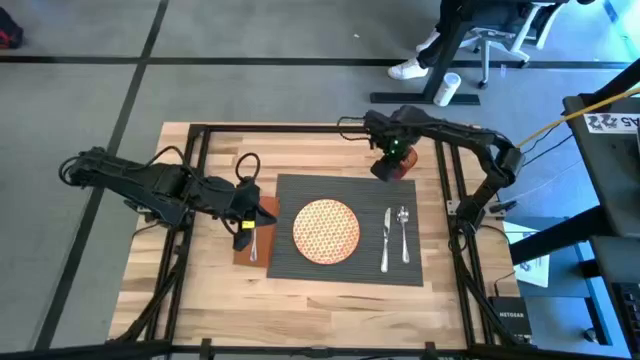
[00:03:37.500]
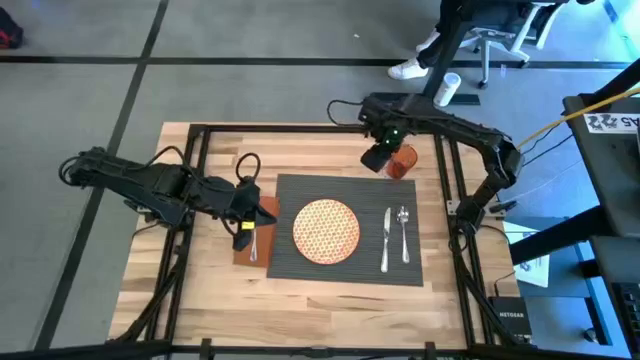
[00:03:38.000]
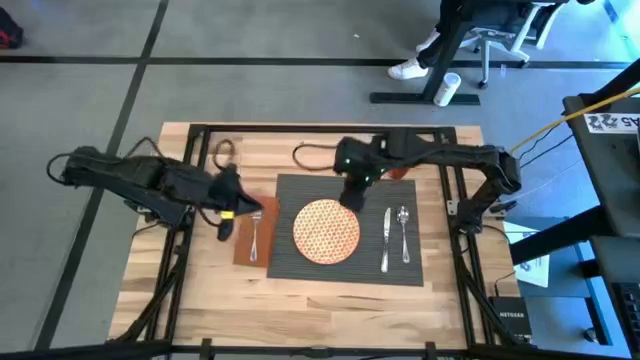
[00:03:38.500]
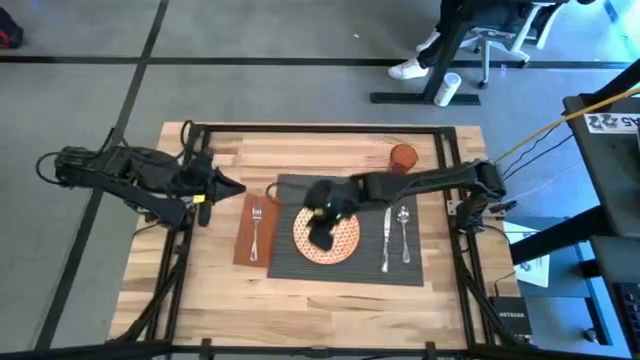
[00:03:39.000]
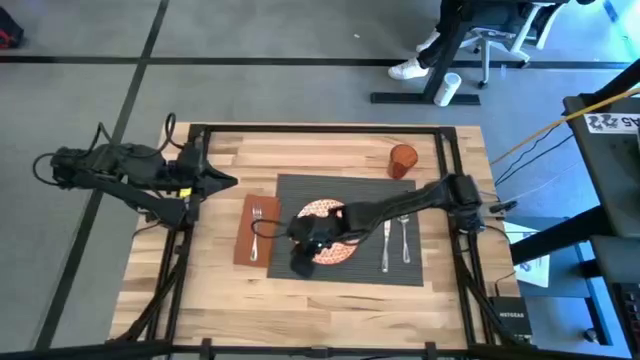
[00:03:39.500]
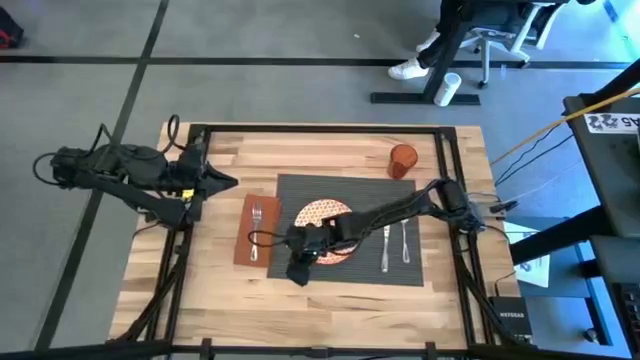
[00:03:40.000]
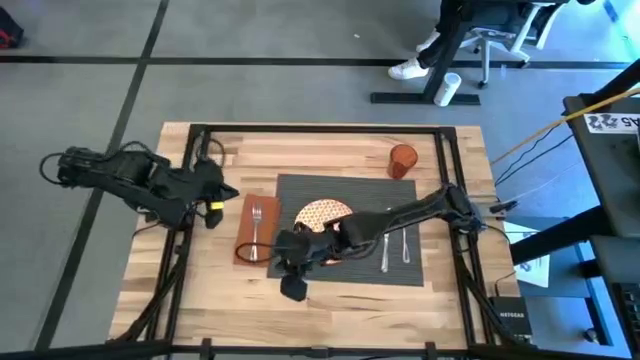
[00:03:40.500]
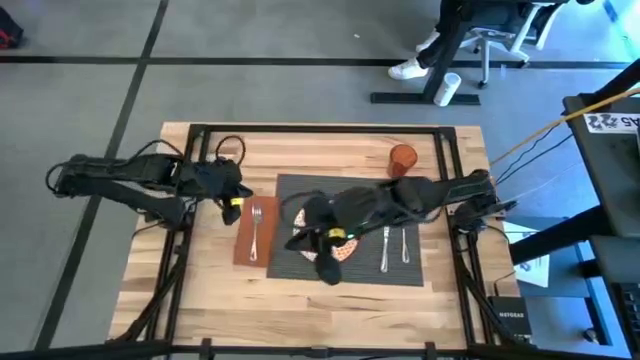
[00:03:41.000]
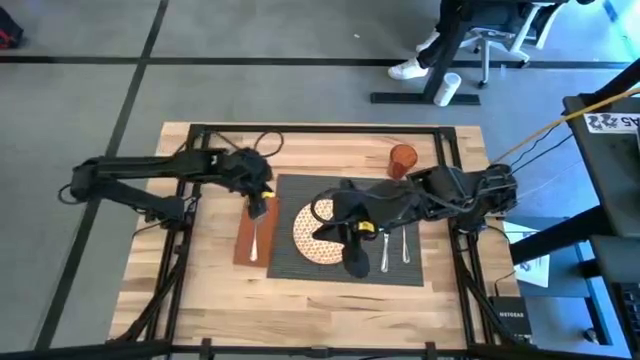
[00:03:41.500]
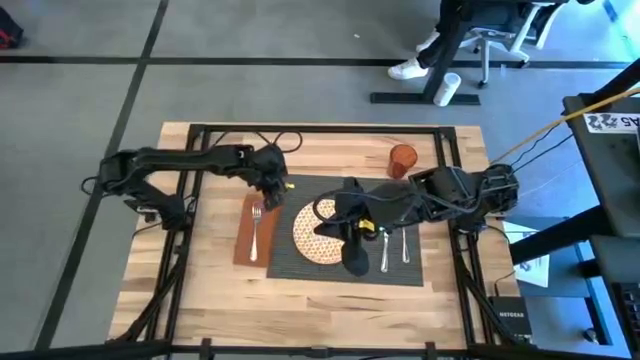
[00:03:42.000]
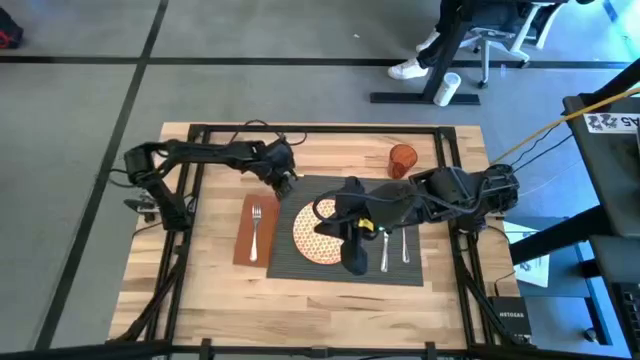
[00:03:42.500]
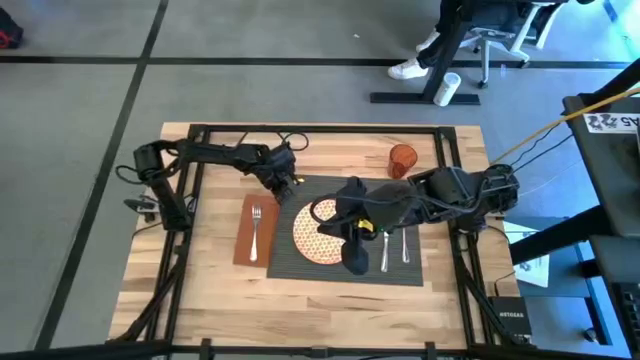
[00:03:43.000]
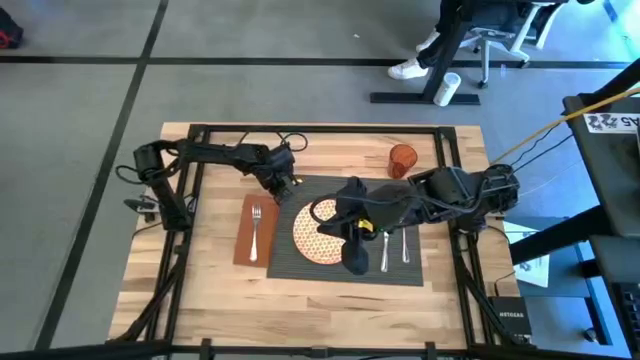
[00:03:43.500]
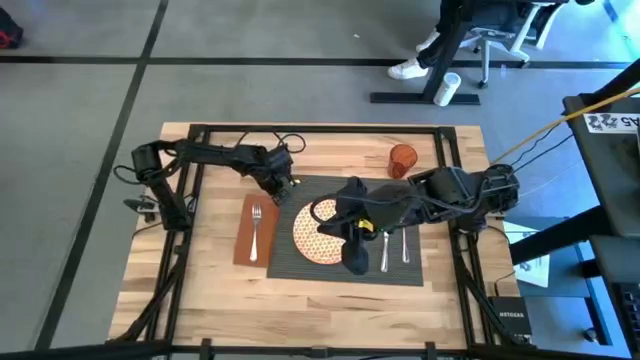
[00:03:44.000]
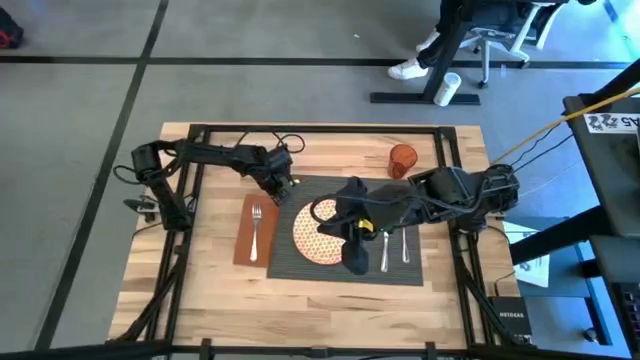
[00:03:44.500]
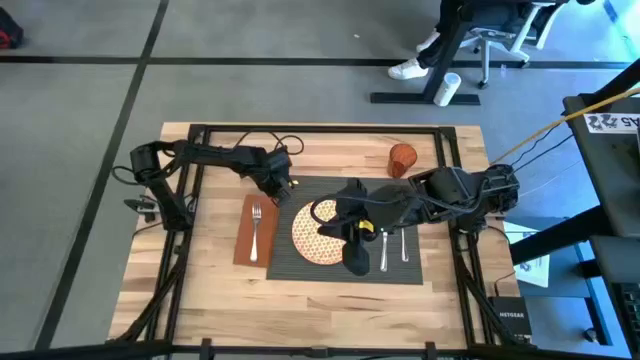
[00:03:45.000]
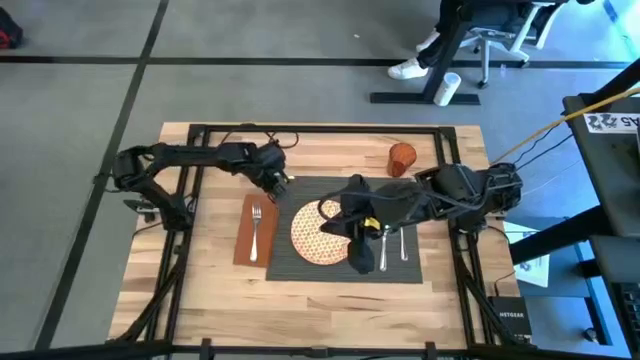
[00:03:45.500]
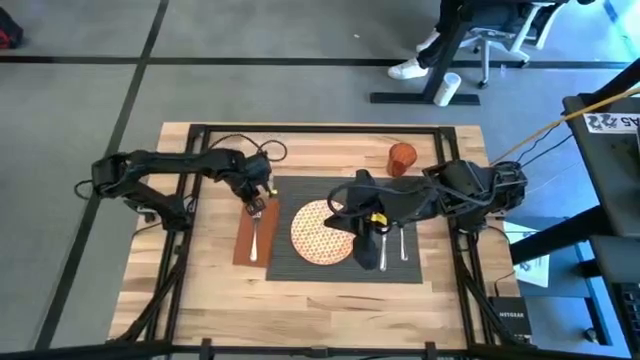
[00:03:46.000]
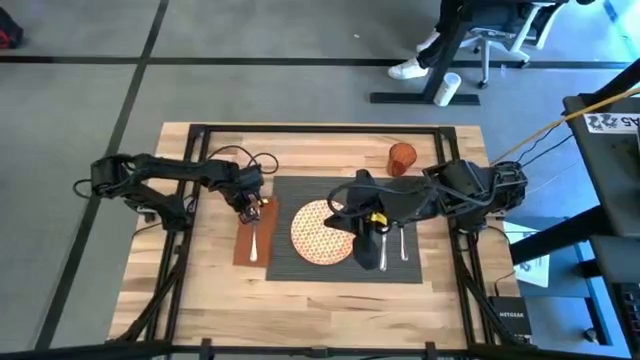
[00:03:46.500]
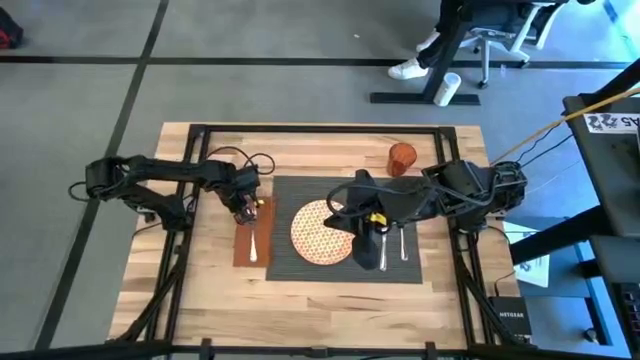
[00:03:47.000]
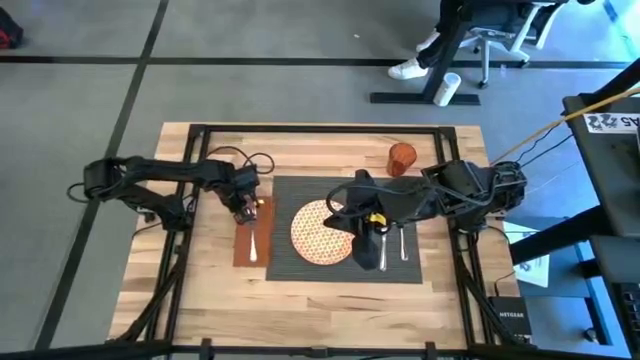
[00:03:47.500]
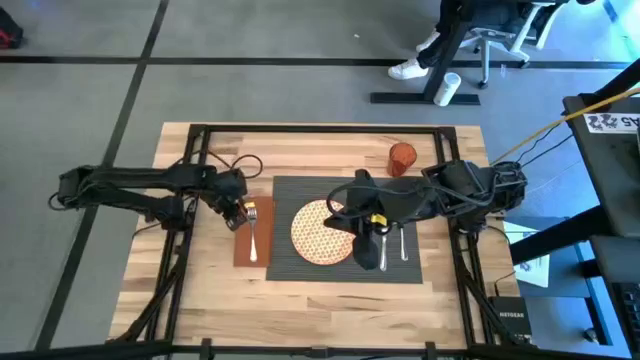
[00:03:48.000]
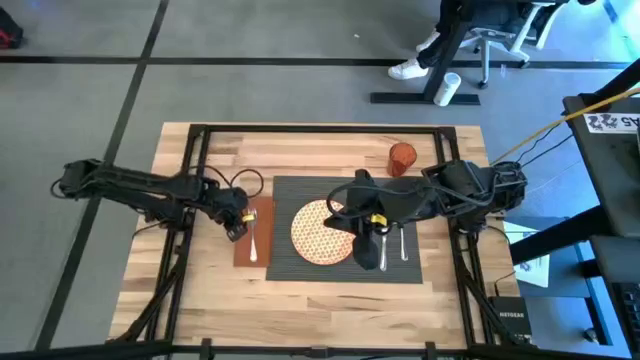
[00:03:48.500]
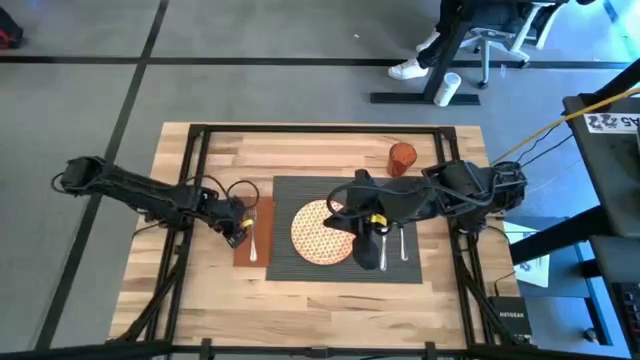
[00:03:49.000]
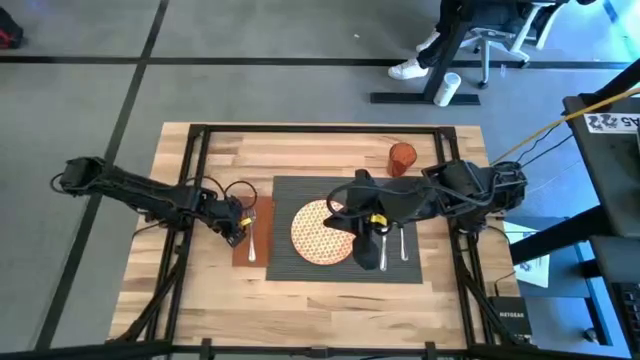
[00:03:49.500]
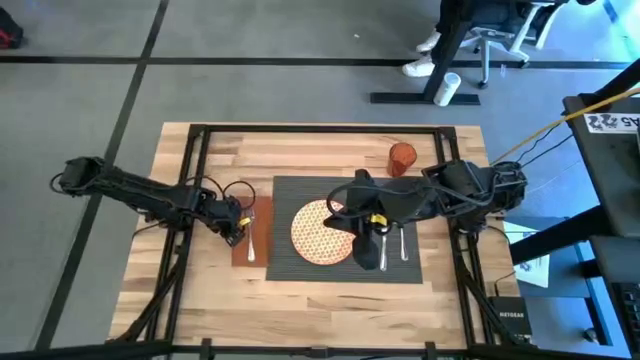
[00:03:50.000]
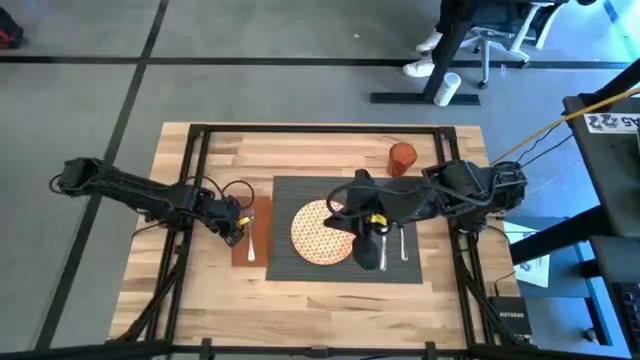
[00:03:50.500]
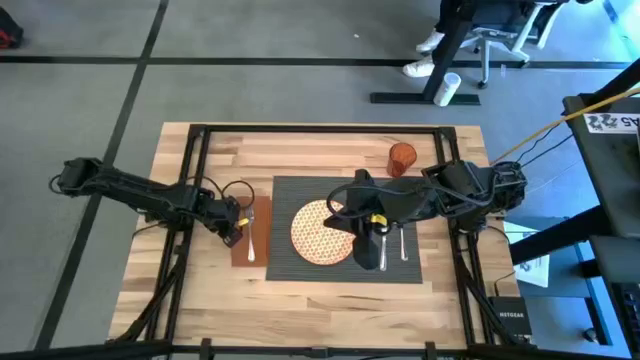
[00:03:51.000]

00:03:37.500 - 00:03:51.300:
Task: Set table place
Adjust the orange table napkin

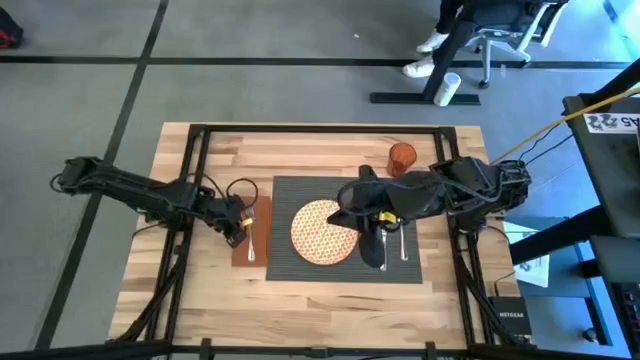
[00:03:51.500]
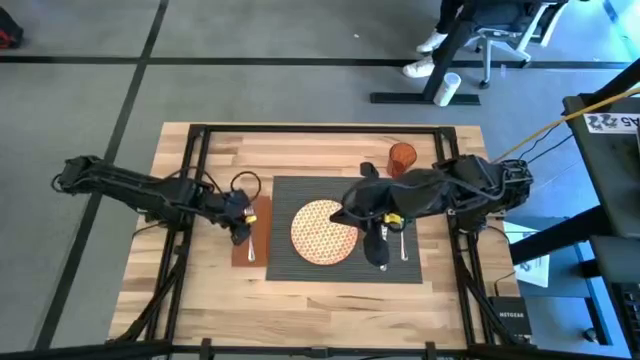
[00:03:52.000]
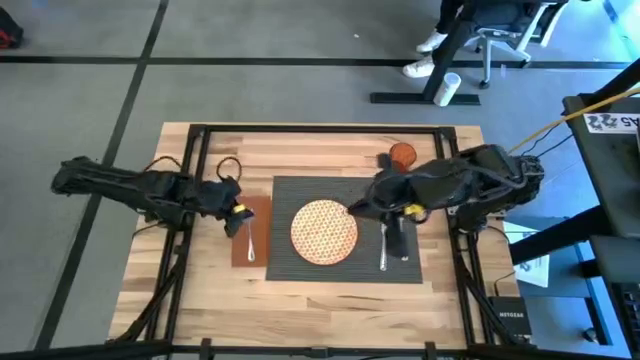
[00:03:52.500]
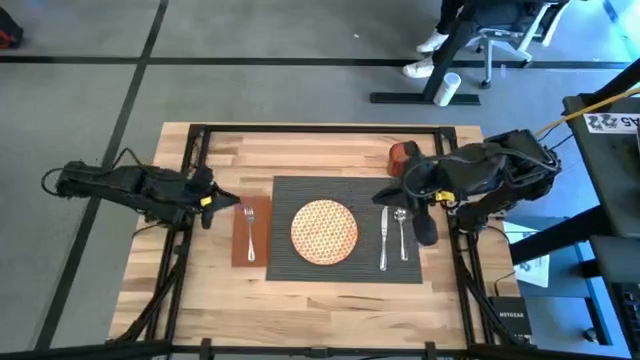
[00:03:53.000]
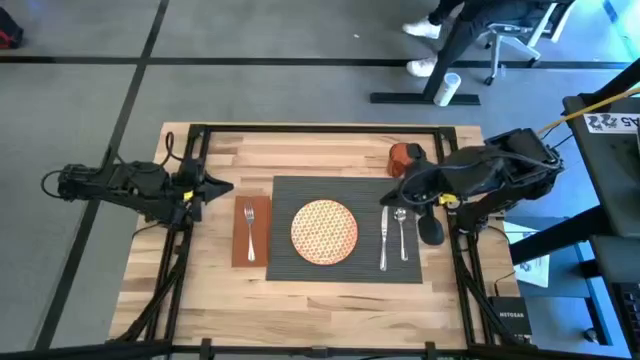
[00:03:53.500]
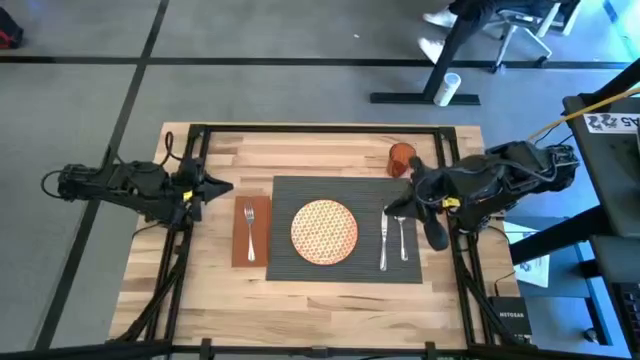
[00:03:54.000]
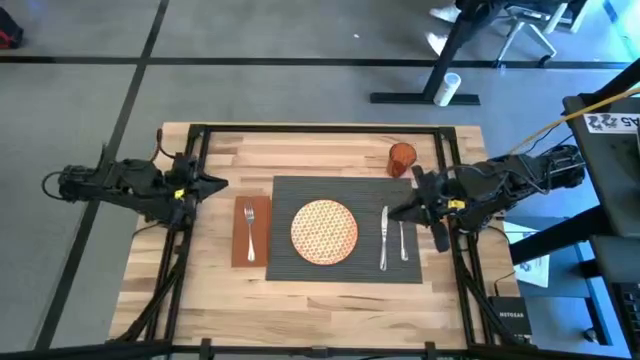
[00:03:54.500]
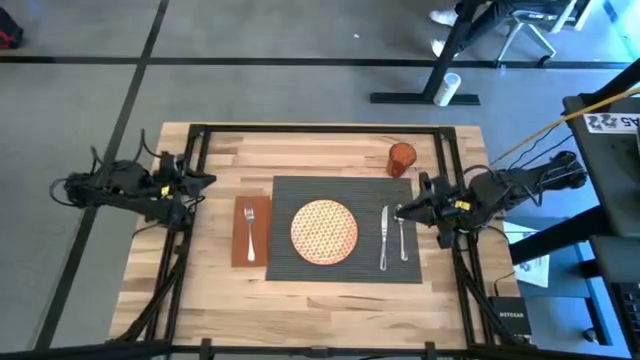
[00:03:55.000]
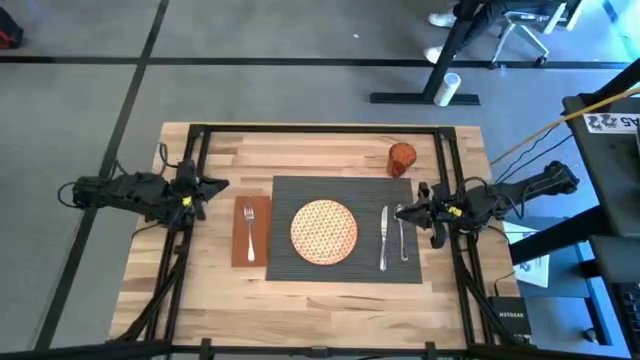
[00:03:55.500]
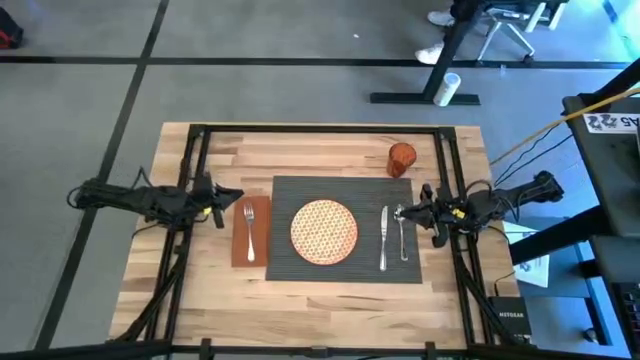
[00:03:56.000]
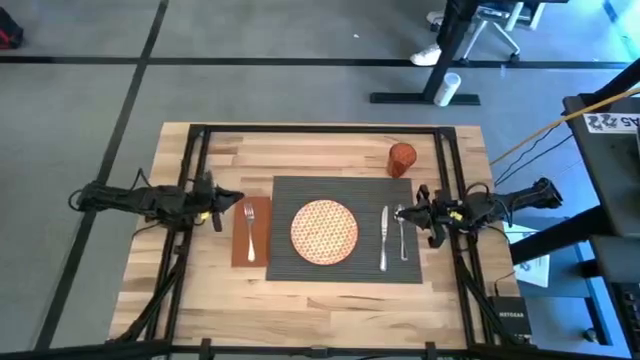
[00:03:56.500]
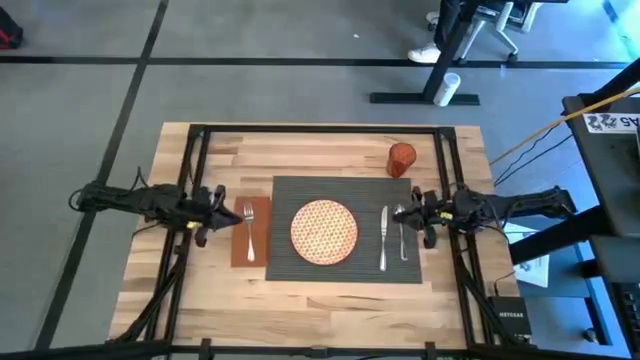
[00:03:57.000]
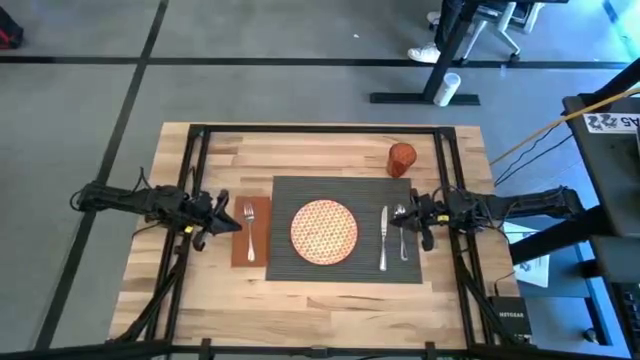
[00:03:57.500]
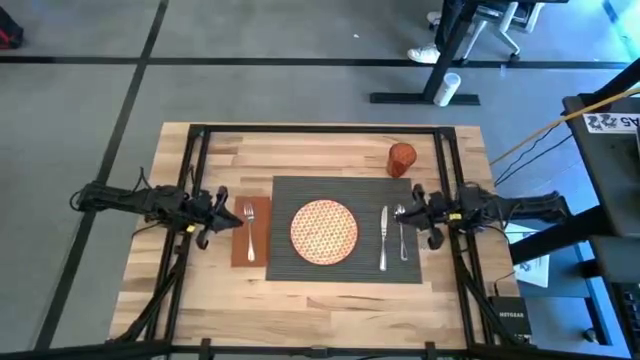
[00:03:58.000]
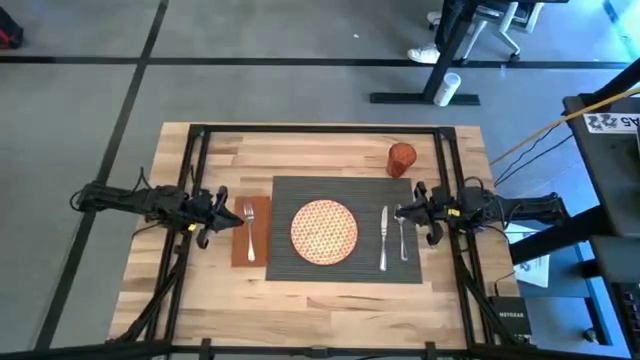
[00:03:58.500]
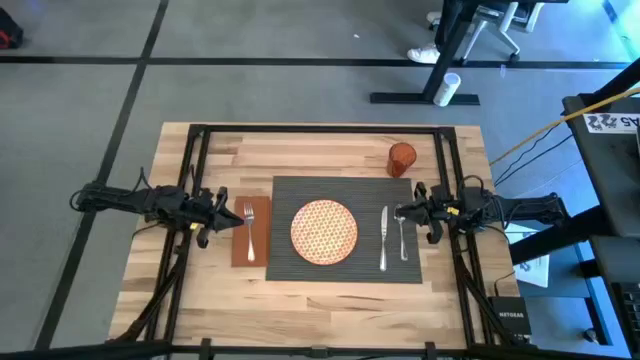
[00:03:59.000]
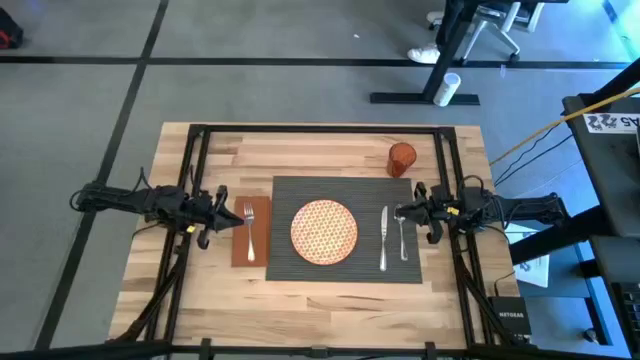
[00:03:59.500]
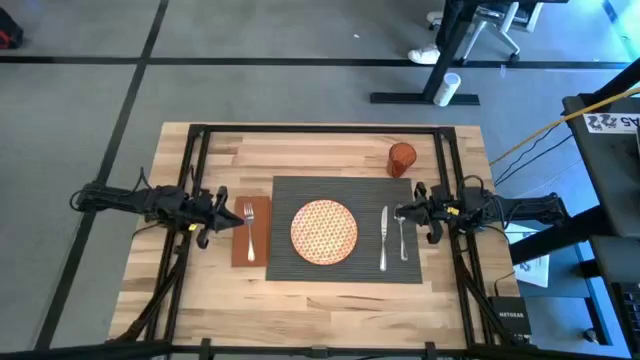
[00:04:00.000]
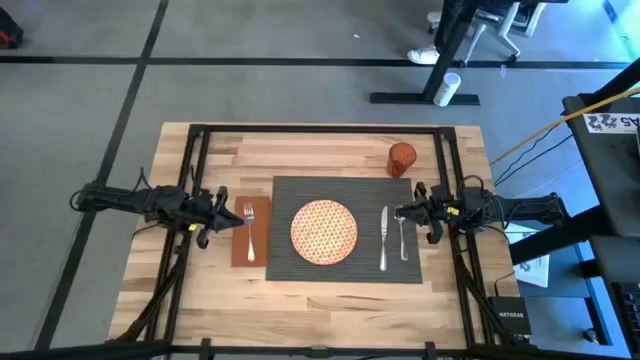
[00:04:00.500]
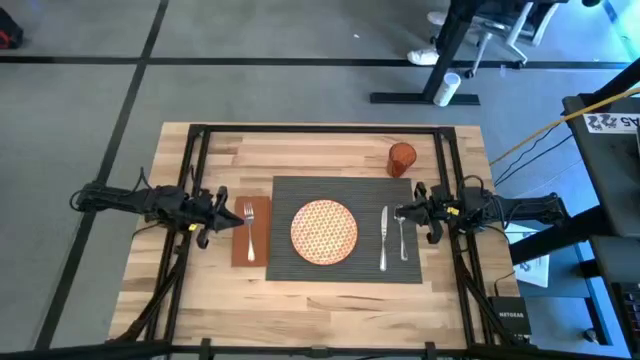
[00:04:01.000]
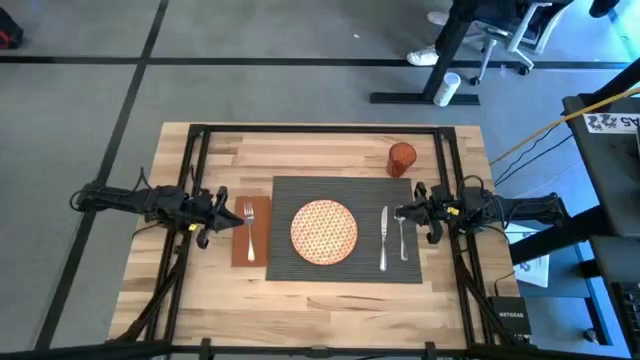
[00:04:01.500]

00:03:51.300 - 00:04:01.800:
Return to Home Position
